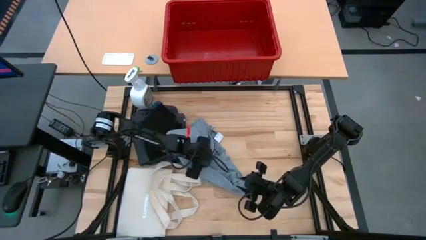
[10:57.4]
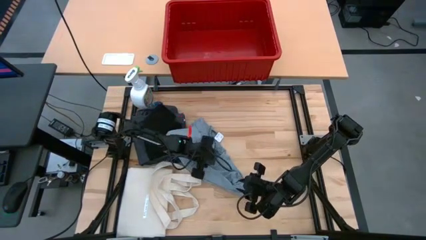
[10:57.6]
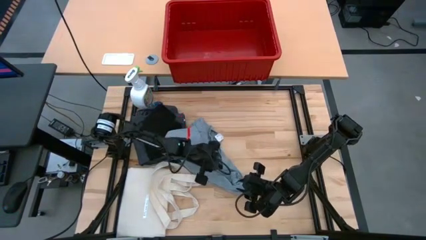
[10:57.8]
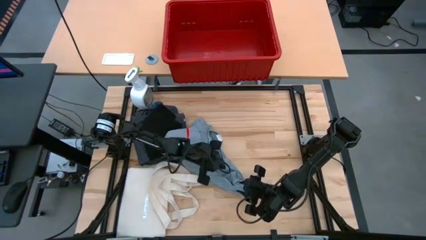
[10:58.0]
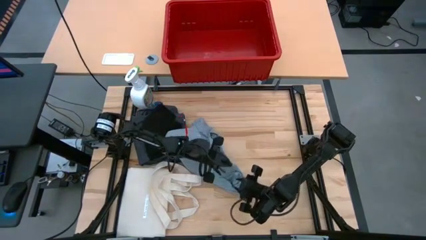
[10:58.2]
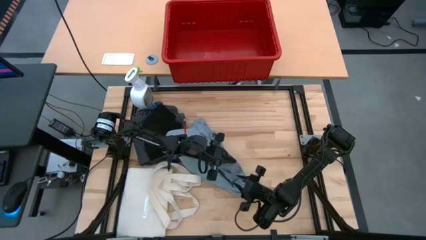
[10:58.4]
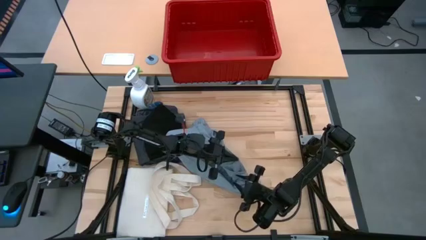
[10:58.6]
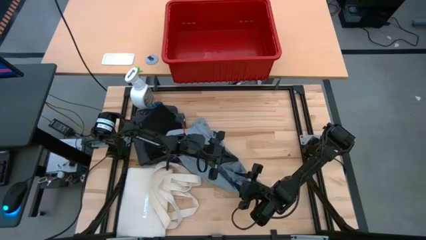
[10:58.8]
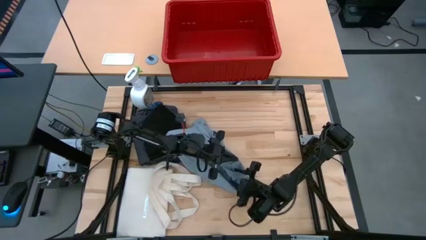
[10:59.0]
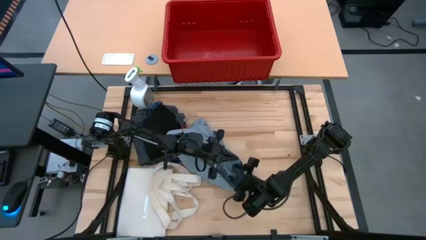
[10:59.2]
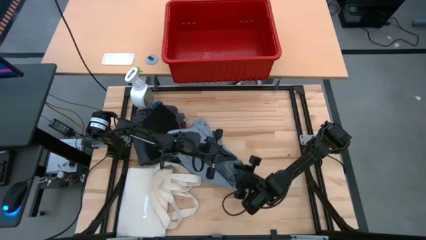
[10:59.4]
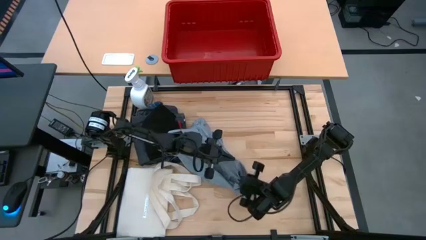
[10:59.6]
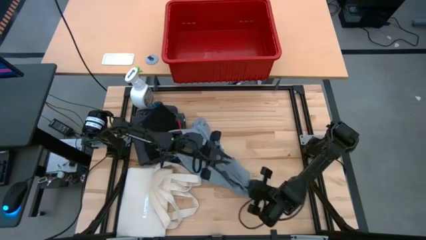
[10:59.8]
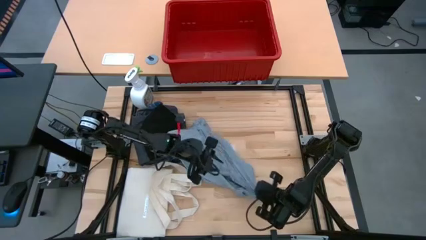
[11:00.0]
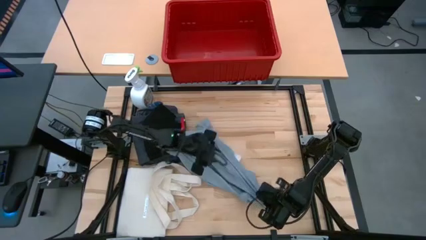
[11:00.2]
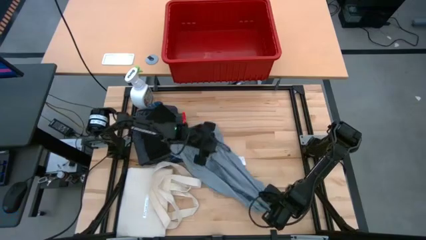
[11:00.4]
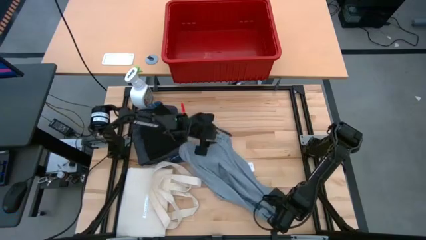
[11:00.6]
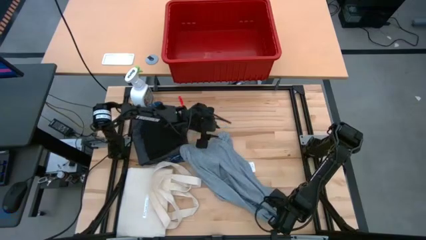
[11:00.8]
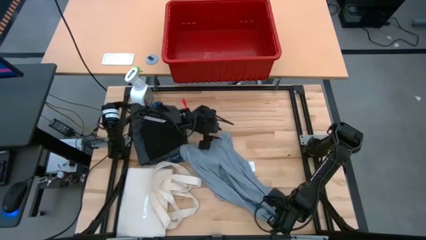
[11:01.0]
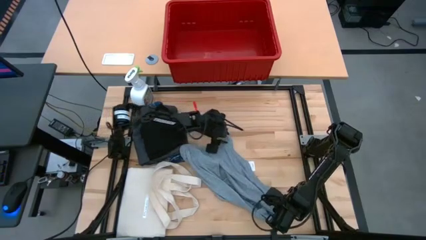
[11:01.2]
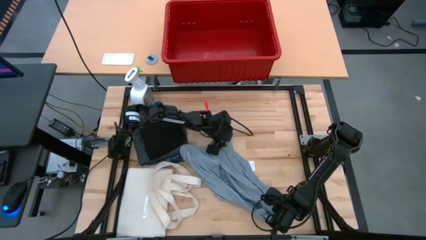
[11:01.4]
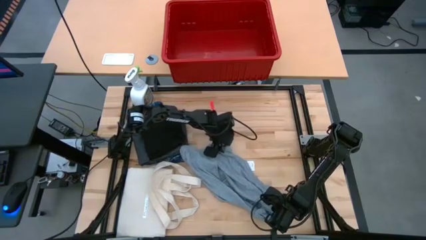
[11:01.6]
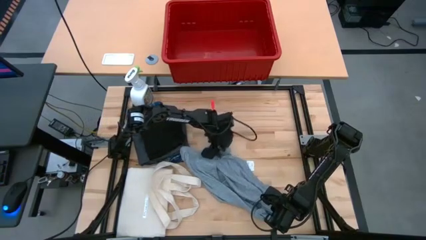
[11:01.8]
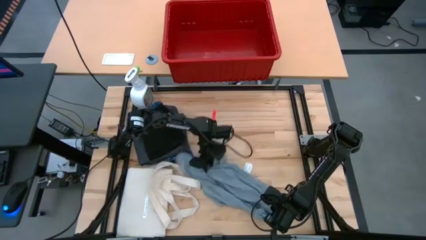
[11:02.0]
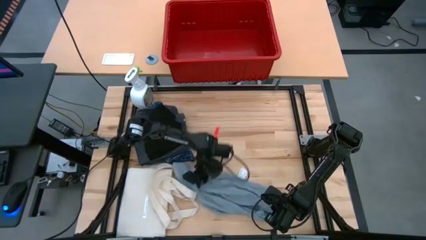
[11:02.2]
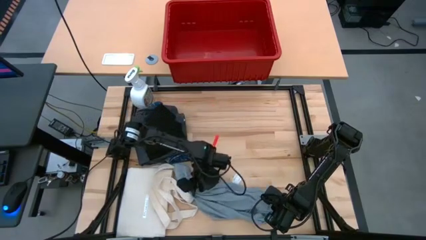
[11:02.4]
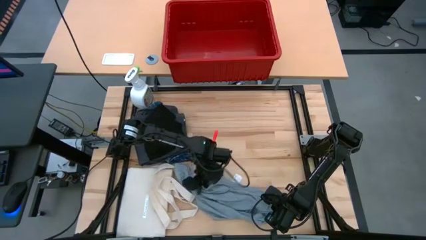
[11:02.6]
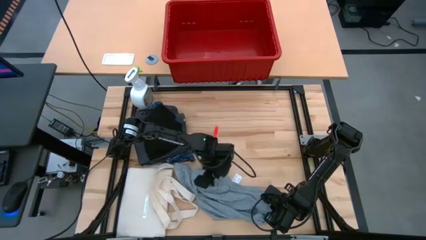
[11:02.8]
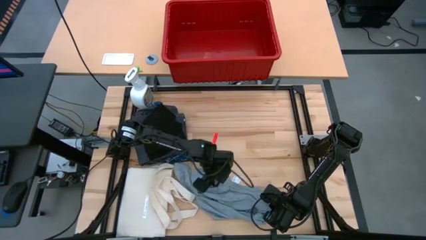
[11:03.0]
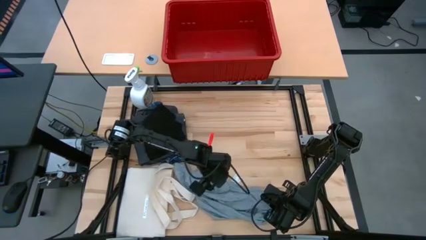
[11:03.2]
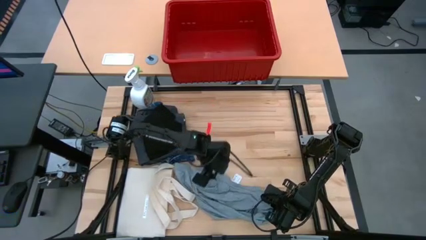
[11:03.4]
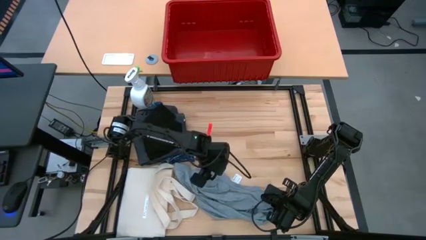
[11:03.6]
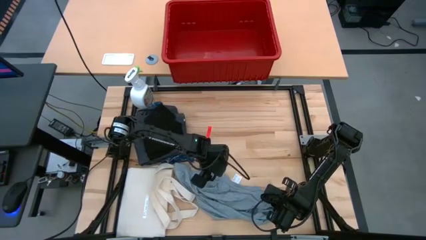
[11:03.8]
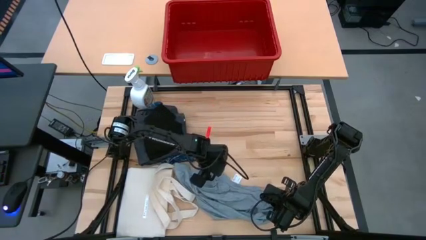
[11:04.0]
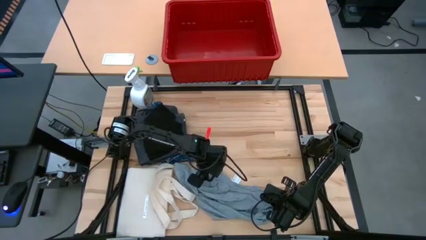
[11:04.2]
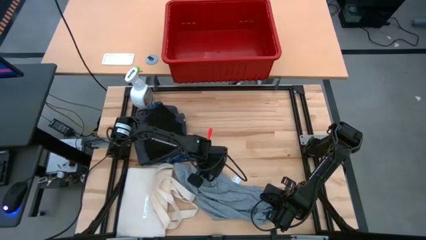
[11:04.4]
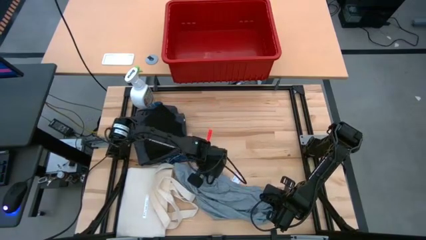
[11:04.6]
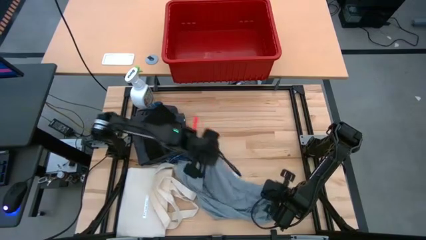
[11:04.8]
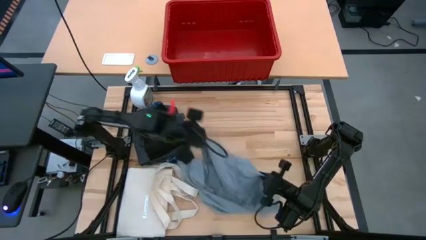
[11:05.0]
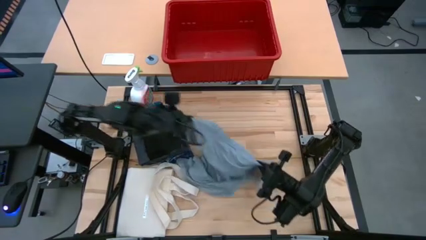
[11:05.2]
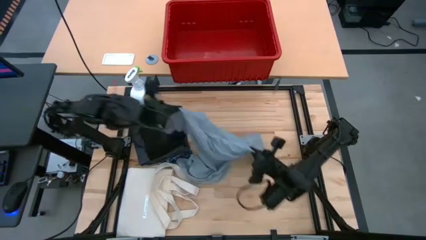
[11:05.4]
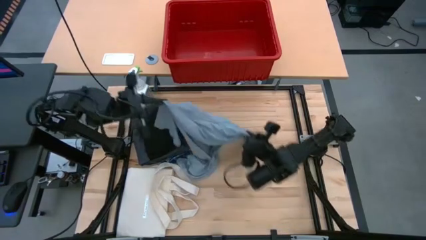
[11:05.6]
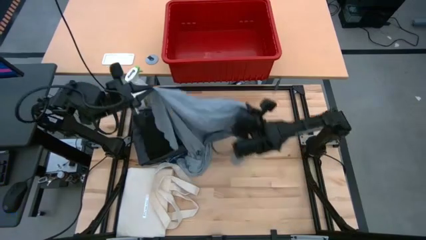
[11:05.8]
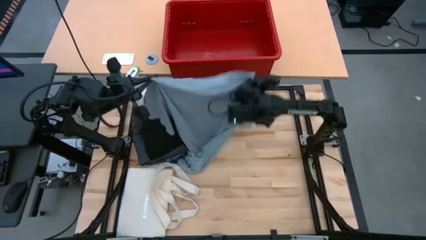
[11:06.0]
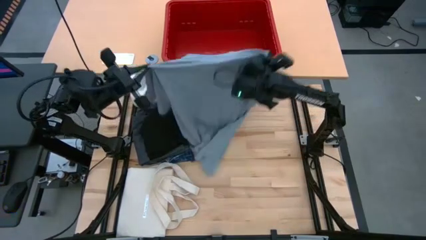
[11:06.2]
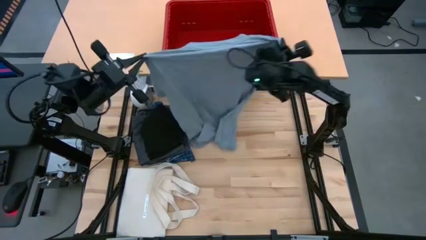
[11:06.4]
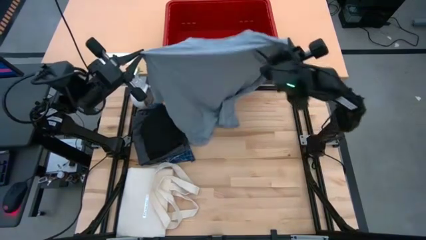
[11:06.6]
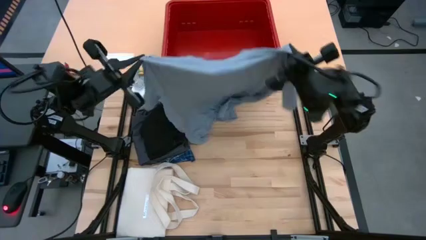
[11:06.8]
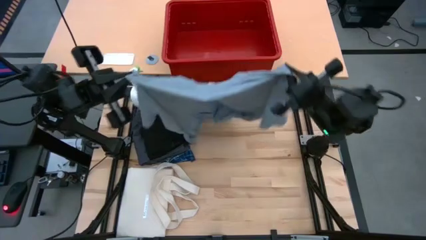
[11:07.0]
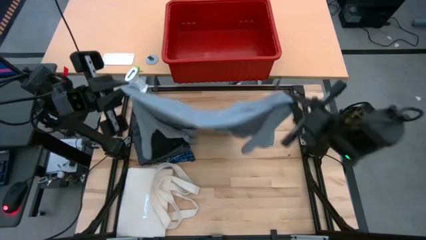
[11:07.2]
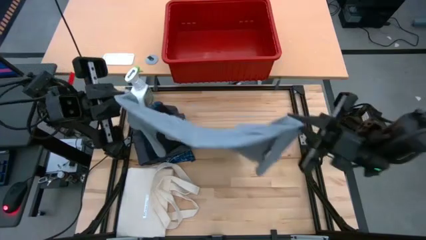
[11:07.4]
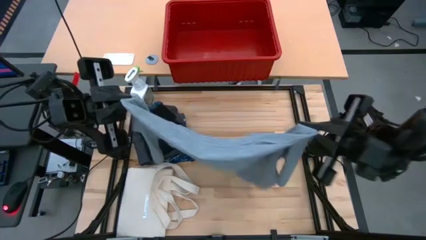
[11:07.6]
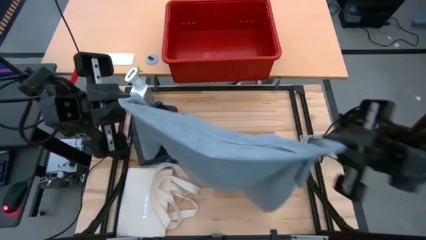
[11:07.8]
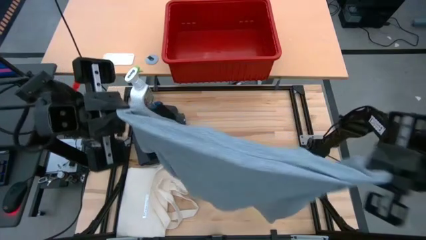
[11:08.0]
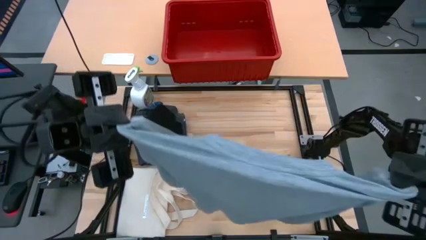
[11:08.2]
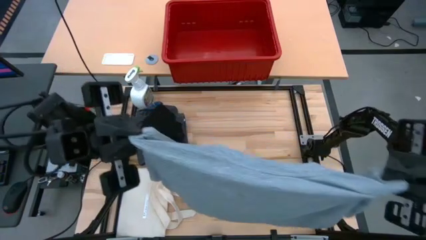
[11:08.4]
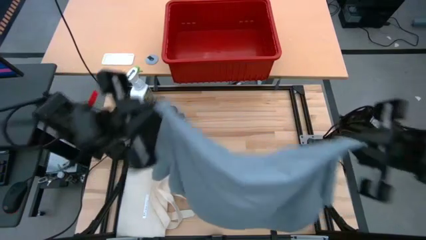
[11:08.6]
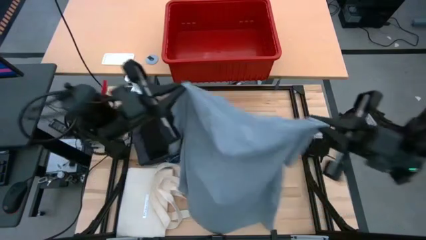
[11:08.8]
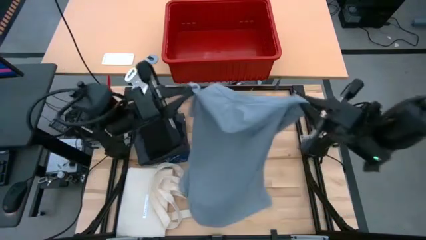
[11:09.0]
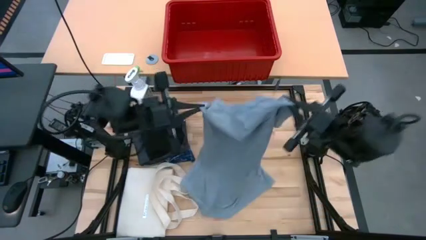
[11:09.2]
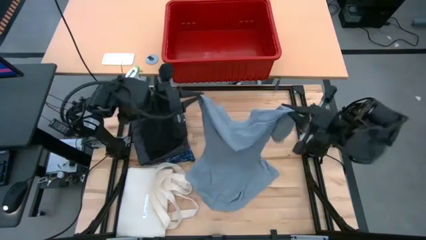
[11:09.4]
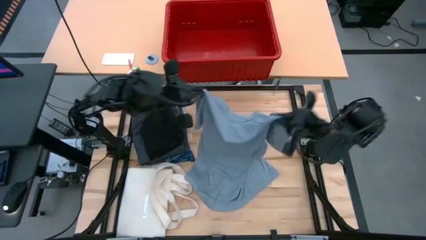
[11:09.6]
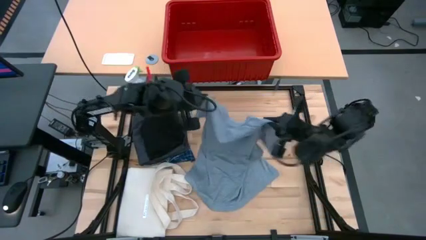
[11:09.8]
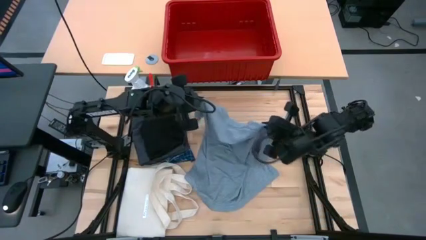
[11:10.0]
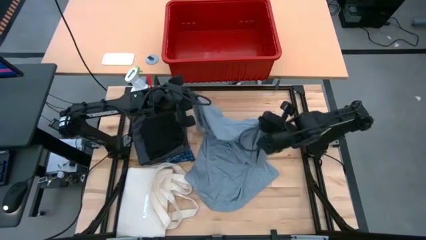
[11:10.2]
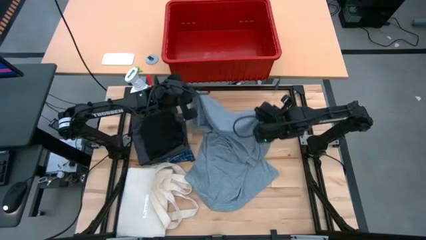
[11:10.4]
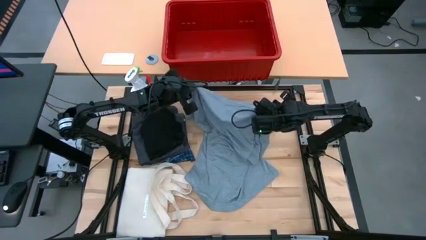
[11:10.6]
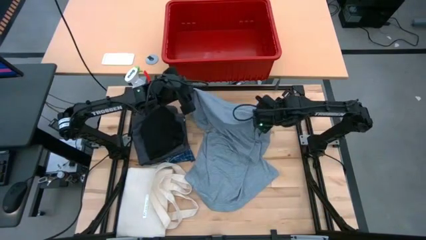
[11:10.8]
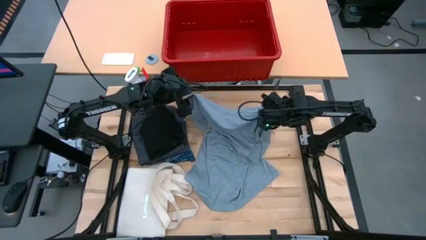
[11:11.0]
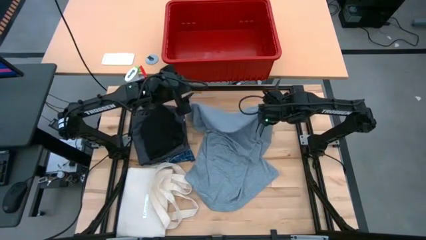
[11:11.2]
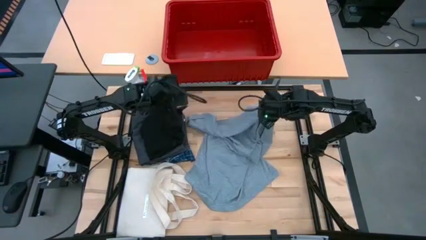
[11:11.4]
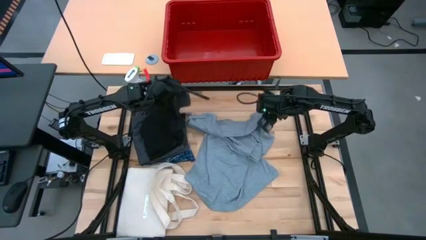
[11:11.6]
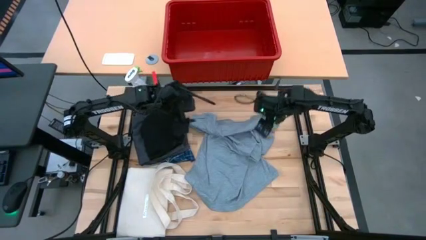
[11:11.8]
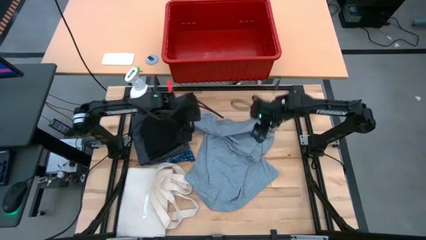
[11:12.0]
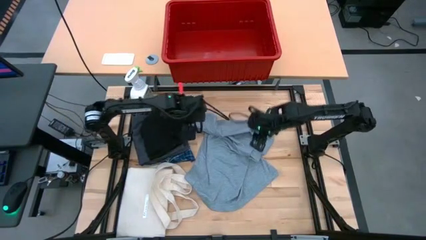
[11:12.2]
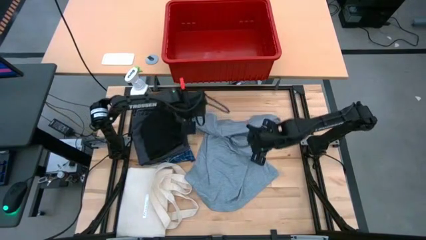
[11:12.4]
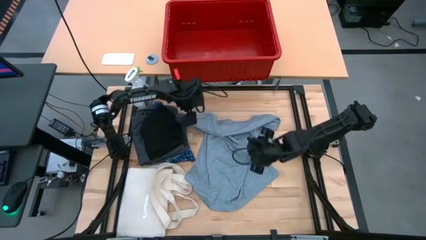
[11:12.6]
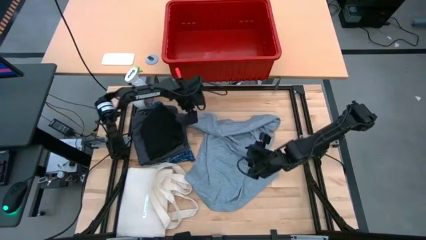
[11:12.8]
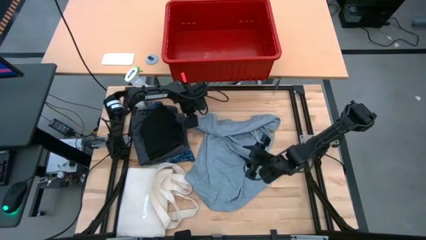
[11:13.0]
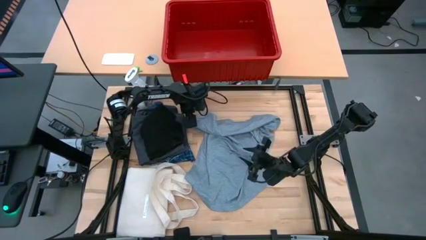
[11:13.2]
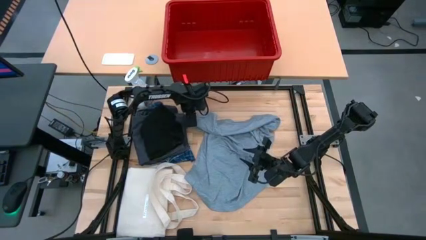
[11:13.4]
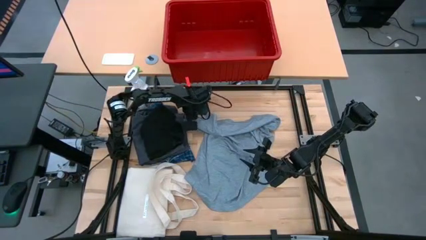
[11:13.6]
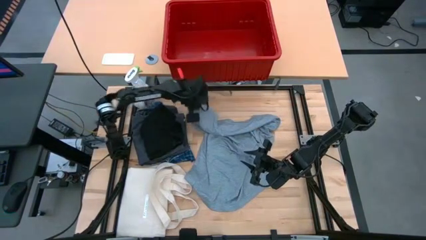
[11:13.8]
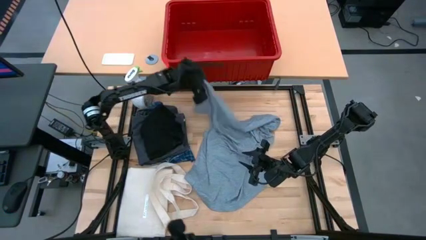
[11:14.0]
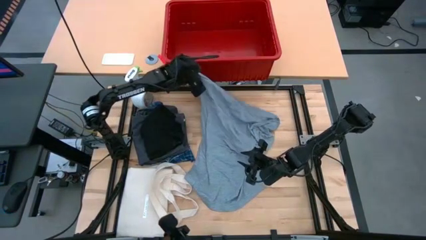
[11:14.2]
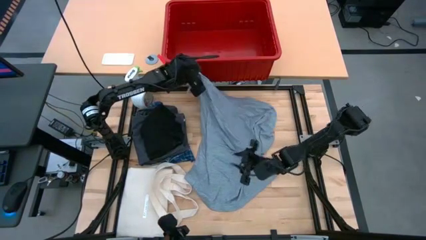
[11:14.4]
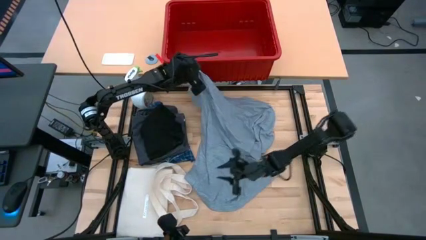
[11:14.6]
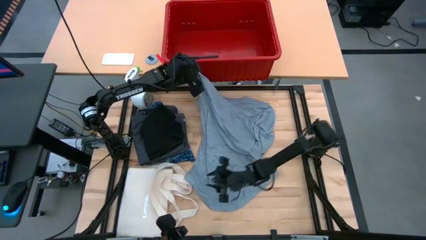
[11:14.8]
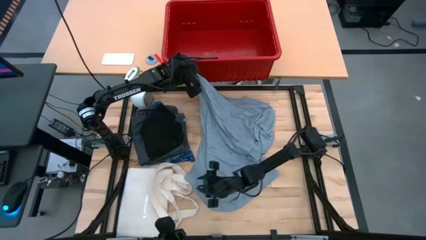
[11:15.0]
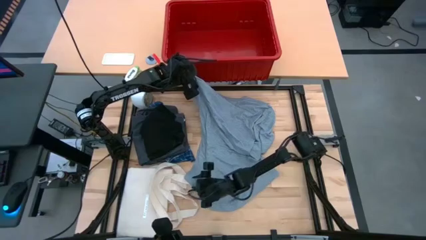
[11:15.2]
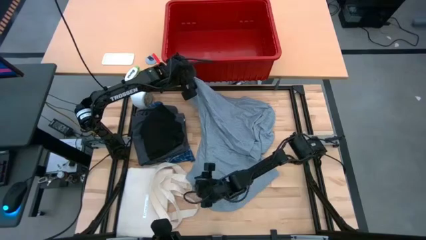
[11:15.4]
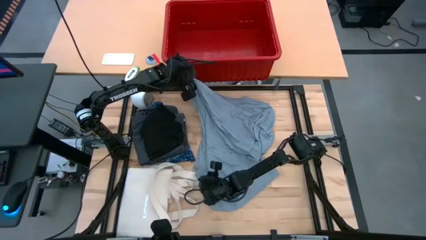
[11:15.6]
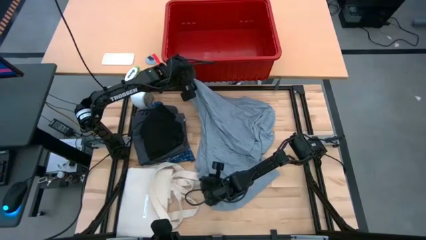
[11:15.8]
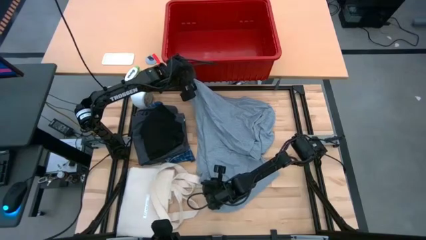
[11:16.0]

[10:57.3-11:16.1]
Task: Fold Laundry from Bin
Fold the gray shirt
